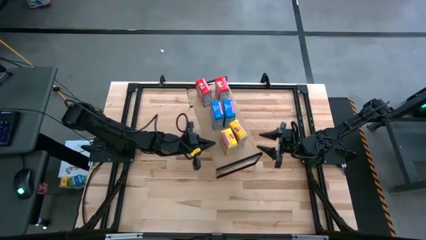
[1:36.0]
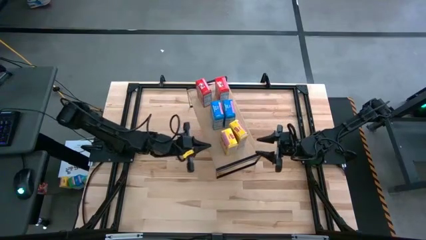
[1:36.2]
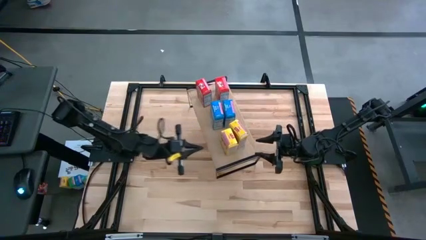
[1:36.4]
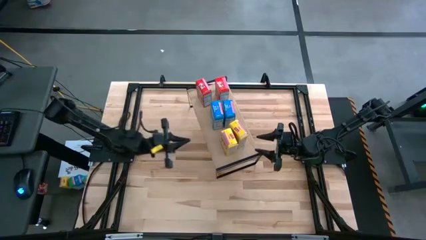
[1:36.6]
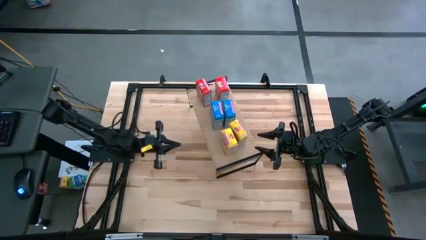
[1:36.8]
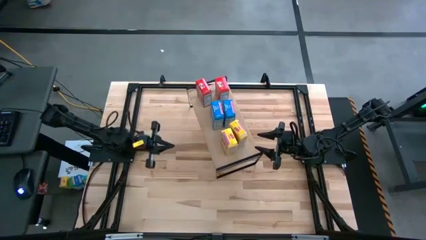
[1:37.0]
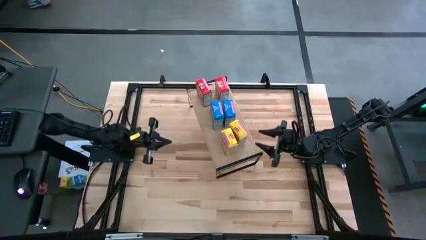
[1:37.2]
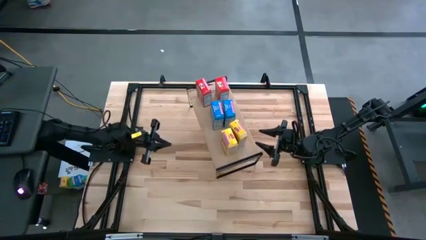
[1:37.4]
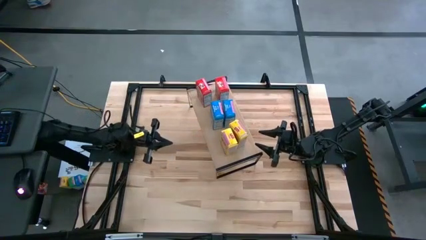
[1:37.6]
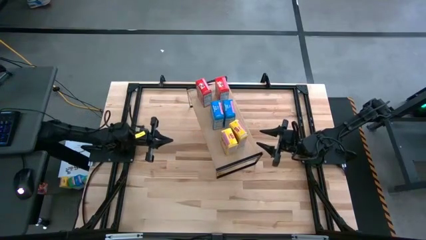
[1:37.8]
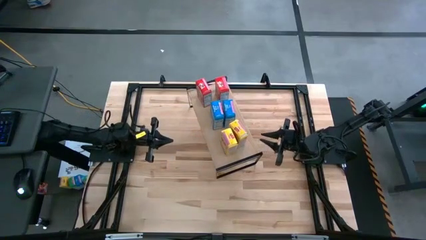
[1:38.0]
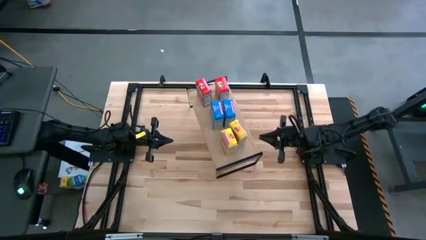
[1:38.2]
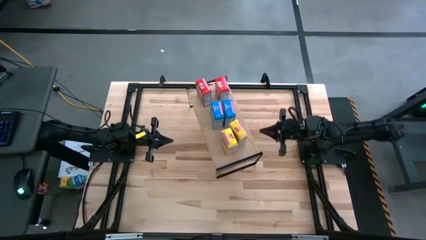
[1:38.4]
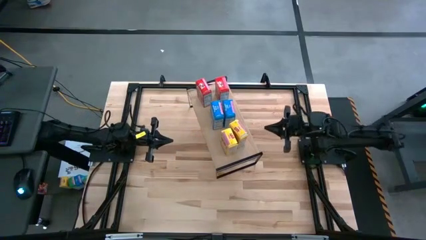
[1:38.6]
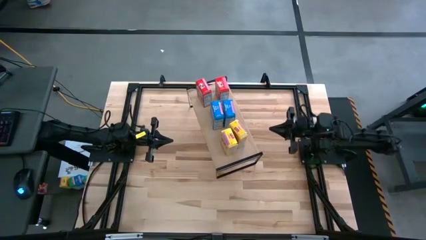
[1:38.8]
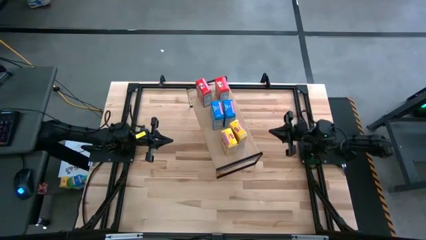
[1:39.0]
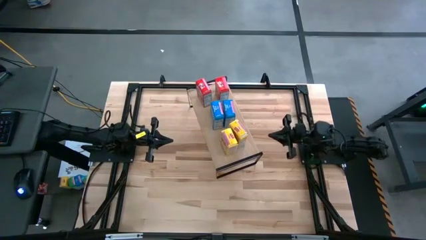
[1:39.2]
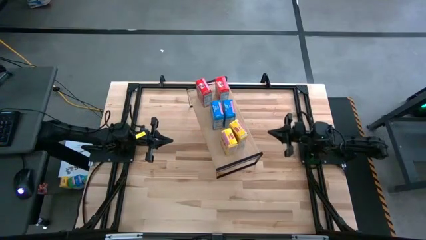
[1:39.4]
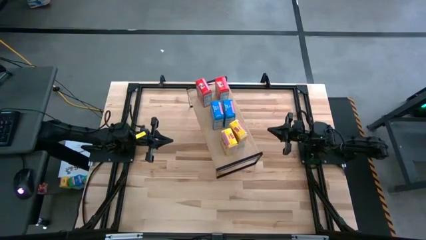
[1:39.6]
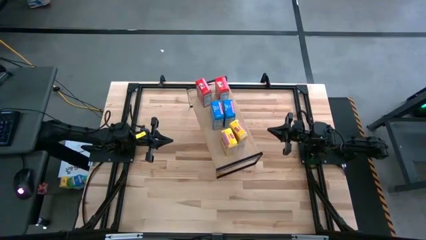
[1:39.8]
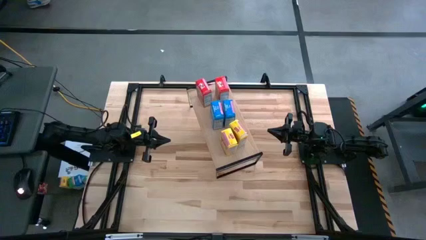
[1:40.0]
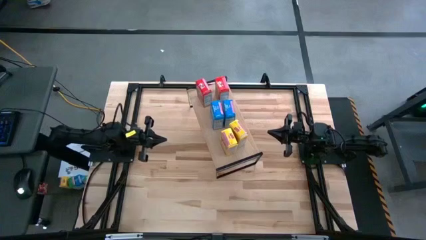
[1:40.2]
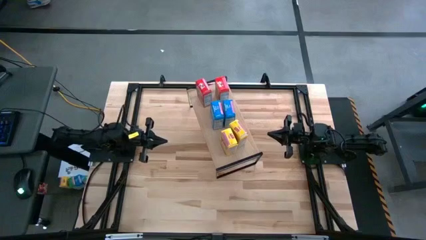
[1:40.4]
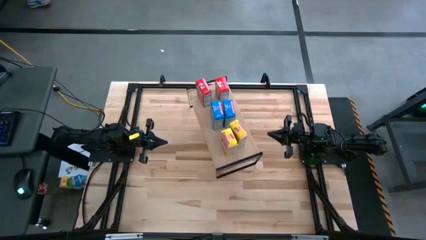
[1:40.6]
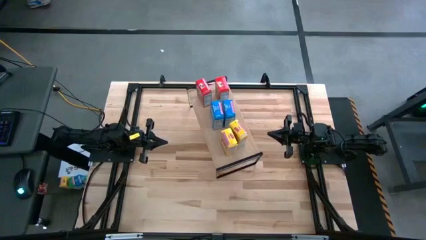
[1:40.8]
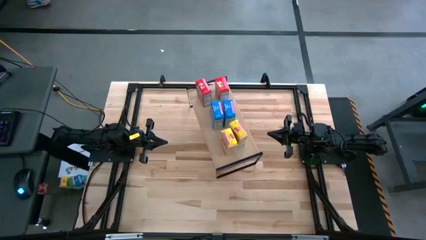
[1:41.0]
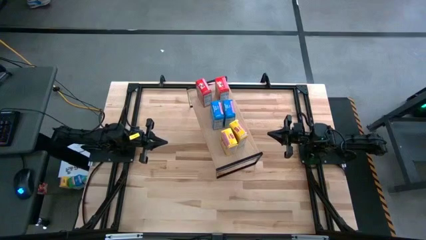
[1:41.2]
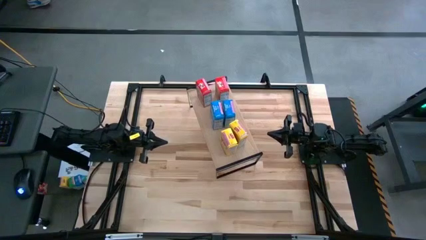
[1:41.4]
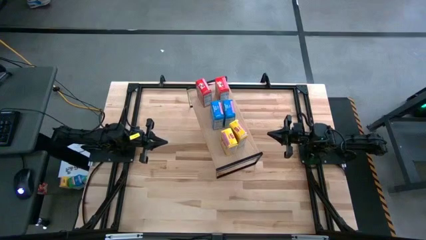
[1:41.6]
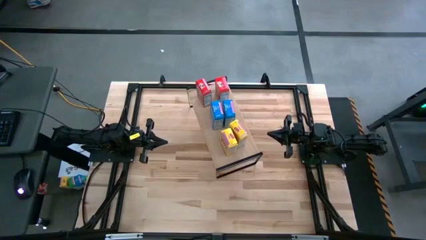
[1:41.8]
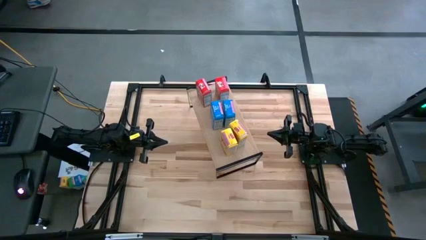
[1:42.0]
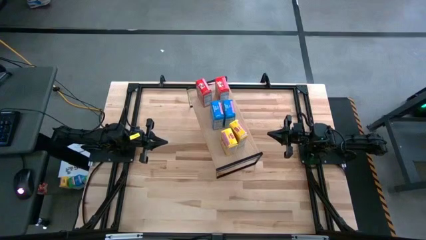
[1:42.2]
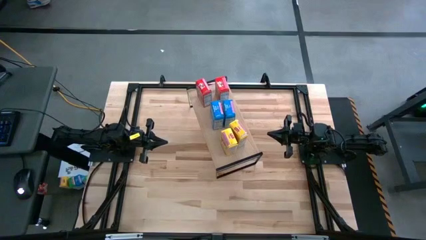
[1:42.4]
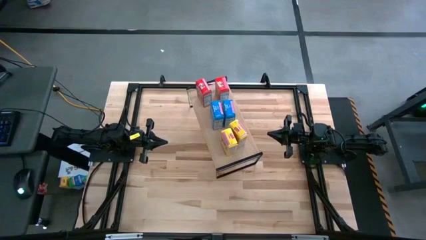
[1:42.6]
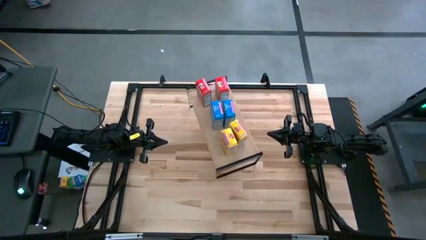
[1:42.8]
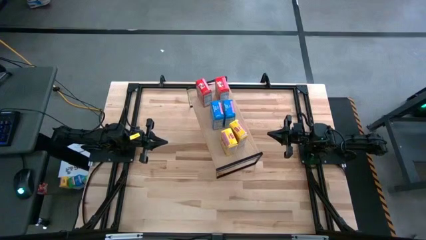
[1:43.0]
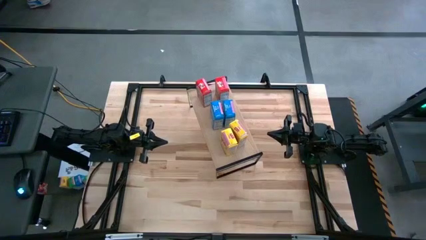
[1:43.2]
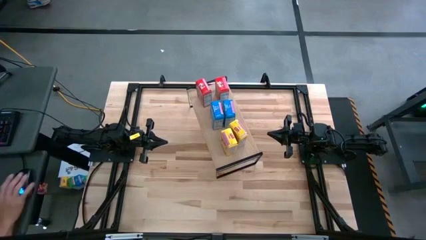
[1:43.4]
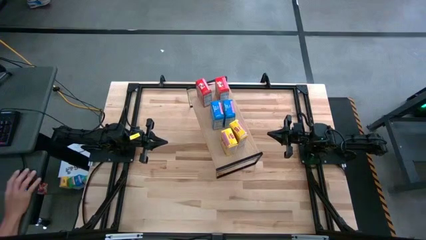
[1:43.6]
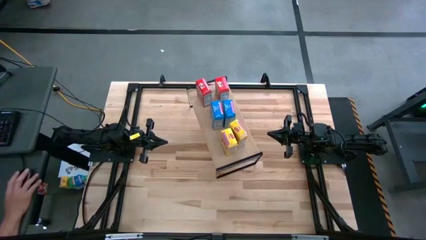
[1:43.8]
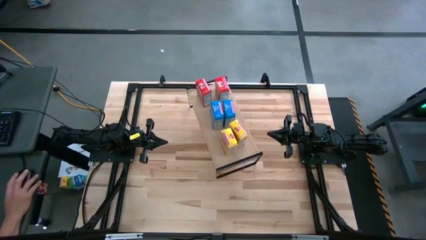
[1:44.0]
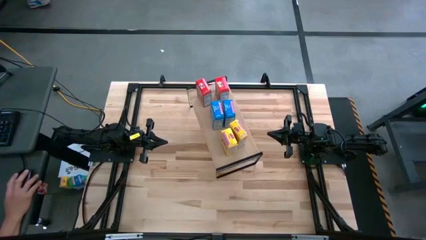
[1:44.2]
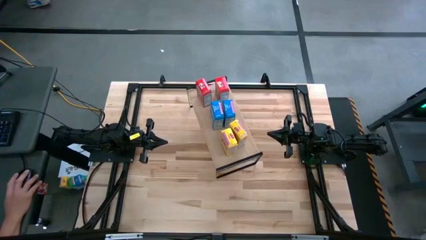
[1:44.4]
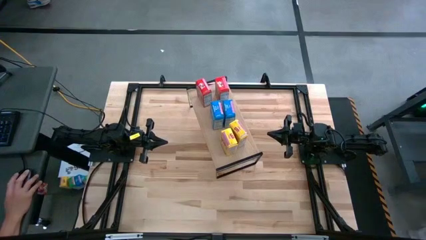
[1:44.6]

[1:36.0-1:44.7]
Task: Stack cereal on shelf
Return to Home Position

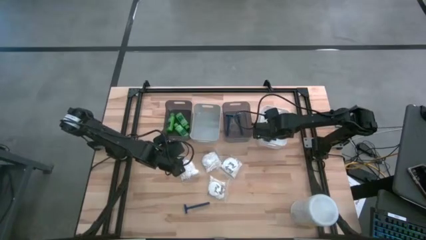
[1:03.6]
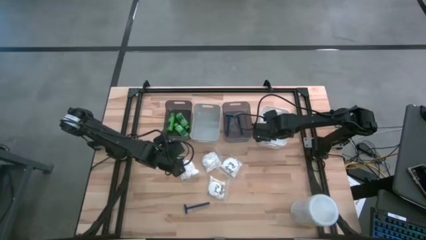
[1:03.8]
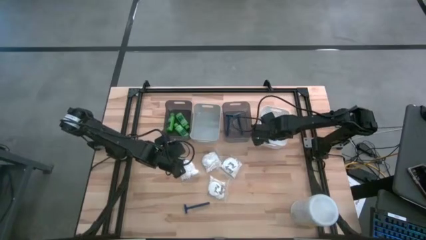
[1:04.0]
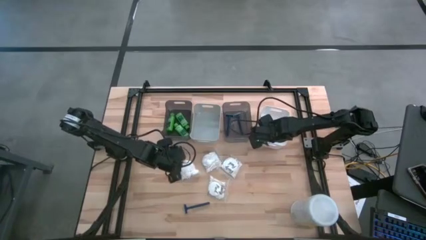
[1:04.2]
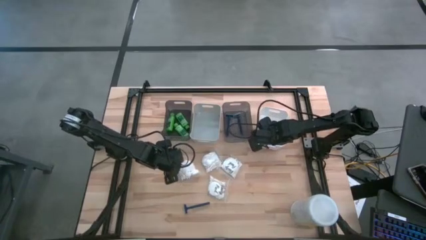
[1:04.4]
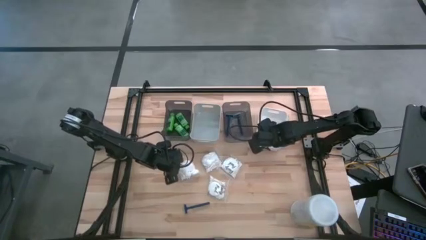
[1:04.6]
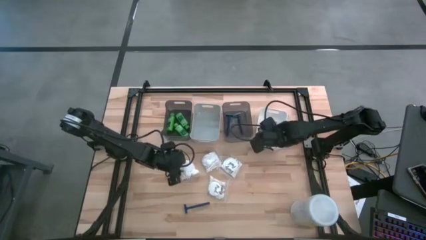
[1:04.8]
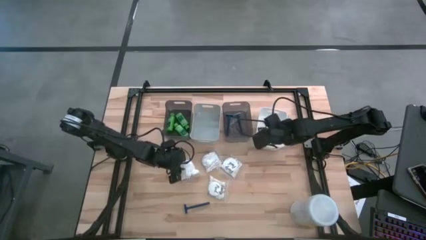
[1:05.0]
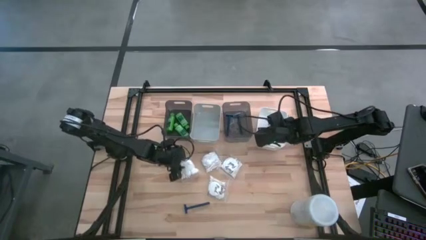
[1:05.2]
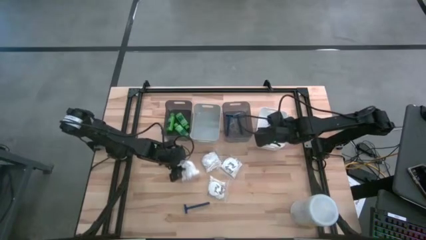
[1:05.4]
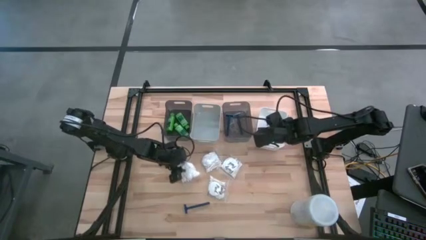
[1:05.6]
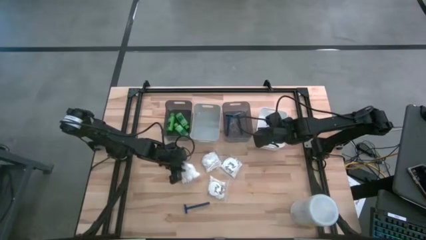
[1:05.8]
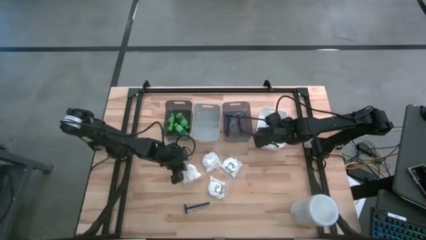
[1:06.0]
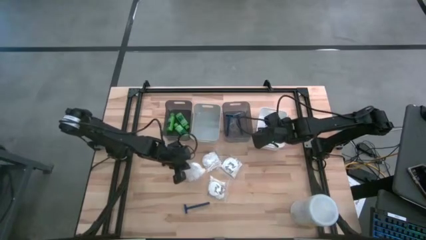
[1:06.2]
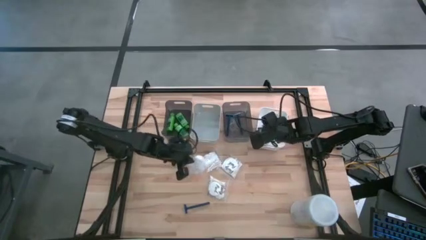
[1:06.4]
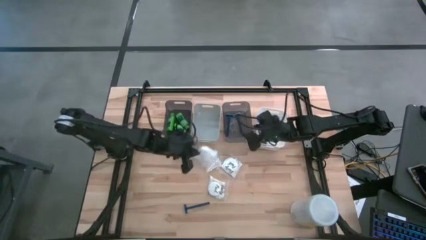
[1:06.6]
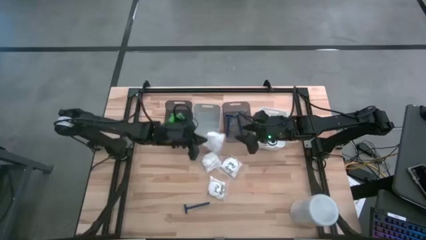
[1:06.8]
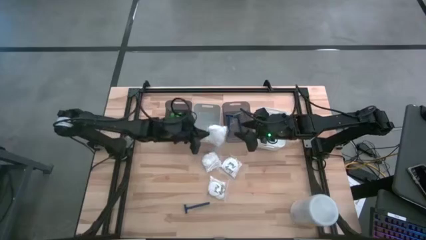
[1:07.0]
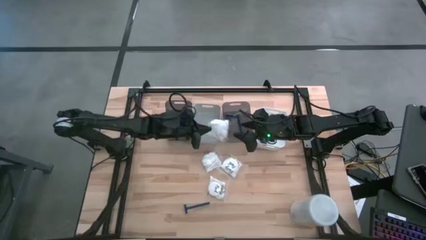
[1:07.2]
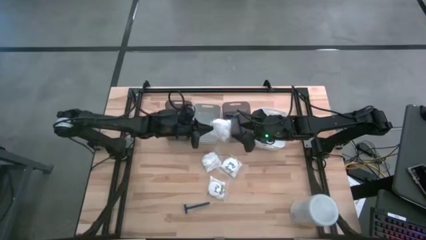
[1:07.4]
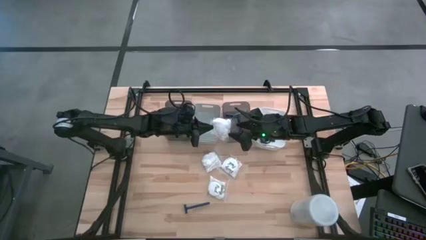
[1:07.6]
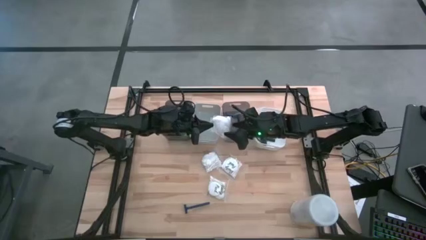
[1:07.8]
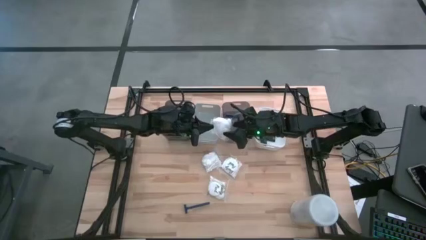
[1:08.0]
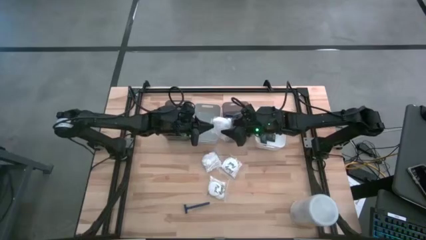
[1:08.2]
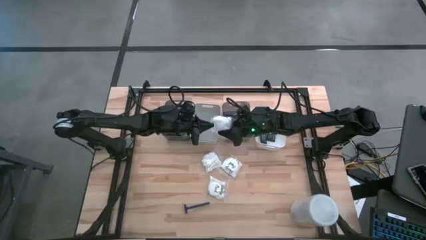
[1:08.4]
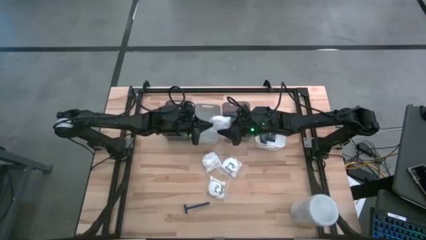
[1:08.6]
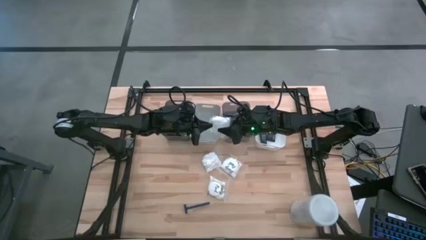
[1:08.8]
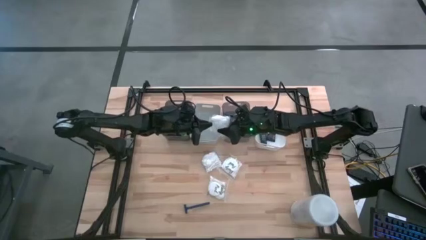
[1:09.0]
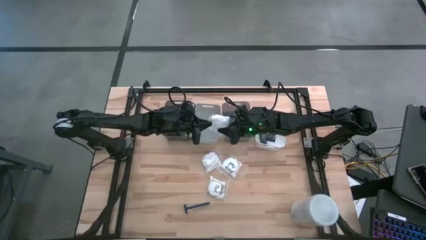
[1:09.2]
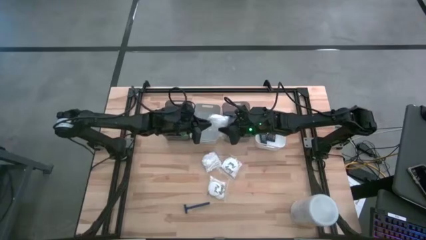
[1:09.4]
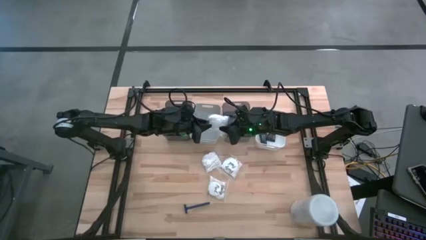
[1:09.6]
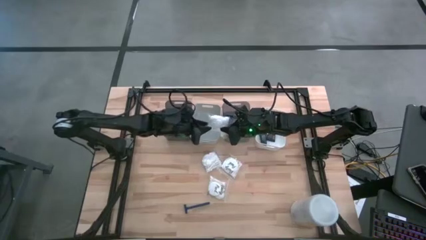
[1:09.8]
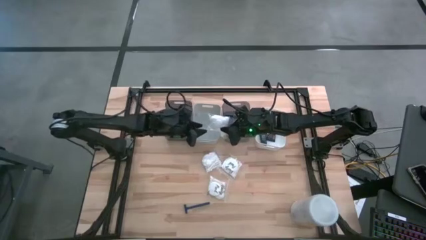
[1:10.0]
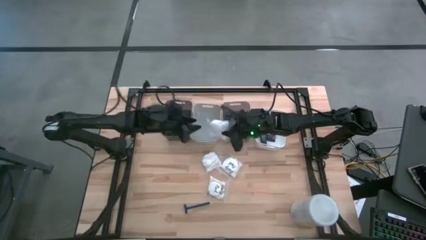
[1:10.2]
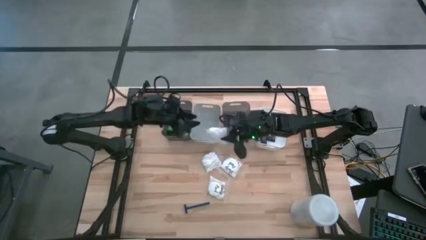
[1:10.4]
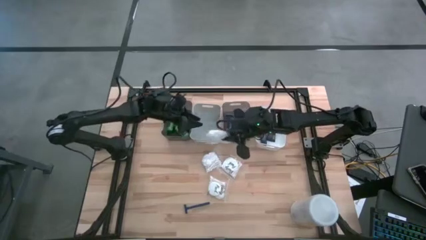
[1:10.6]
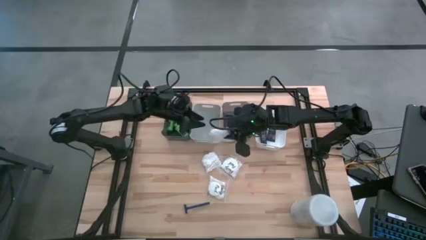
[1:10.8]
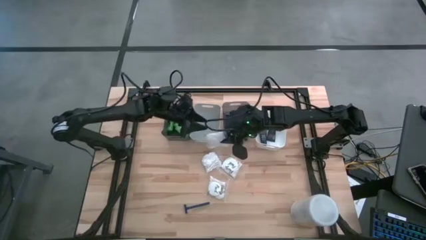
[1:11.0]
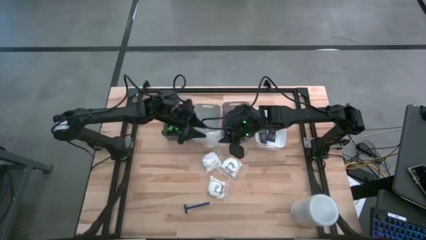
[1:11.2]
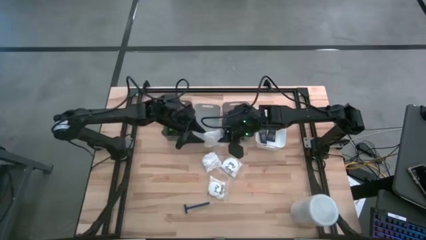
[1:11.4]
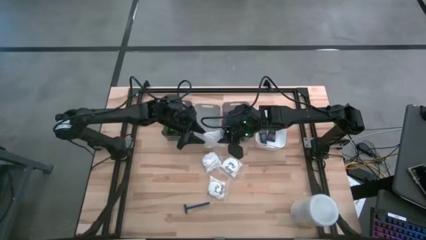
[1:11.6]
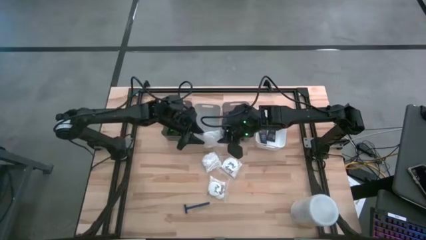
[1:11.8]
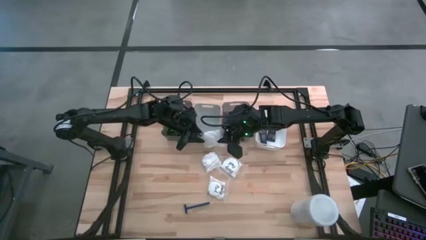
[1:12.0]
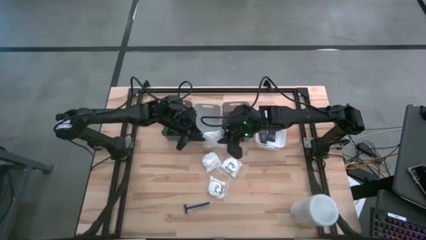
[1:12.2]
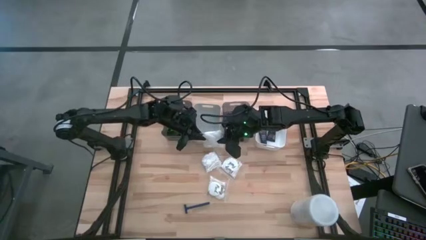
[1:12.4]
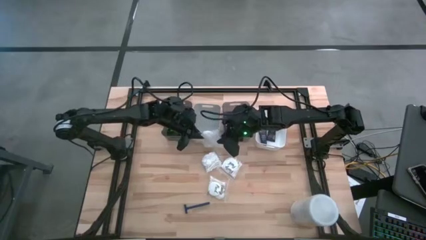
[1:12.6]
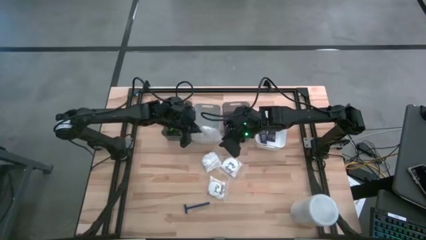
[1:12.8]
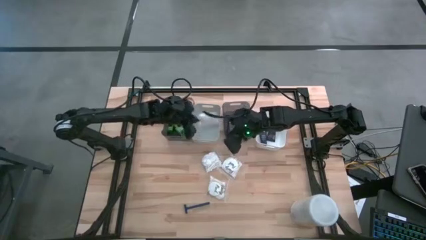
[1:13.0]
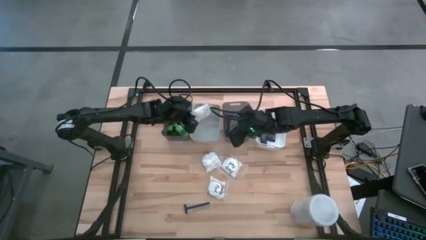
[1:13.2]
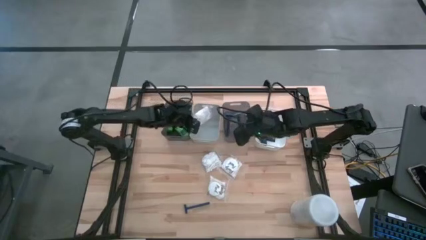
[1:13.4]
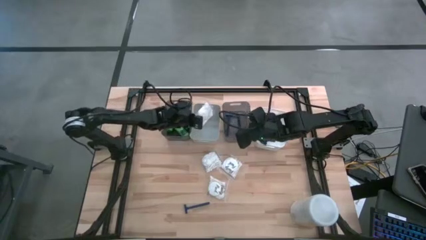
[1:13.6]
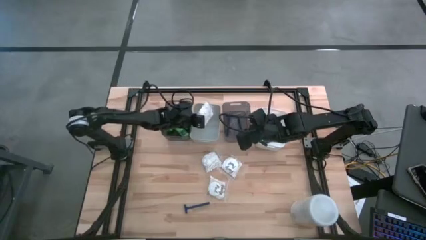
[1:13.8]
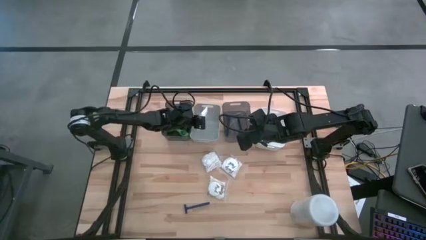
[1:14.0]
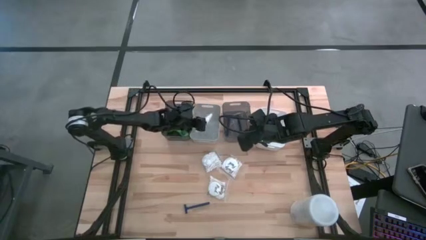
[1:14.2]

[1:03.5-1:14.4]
Task: Pick & Place Travel size toiletries
Put the white cotton pack into the gray bin
